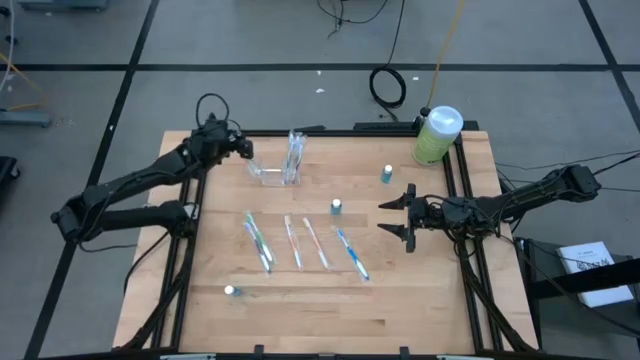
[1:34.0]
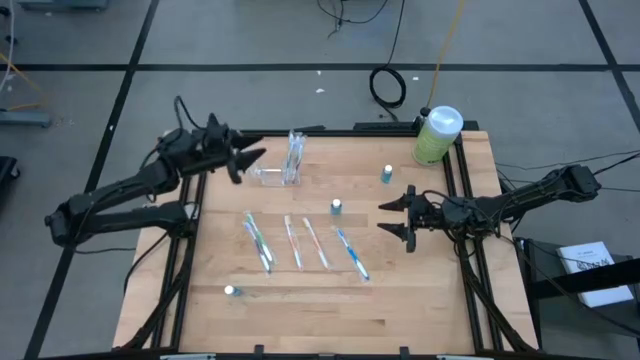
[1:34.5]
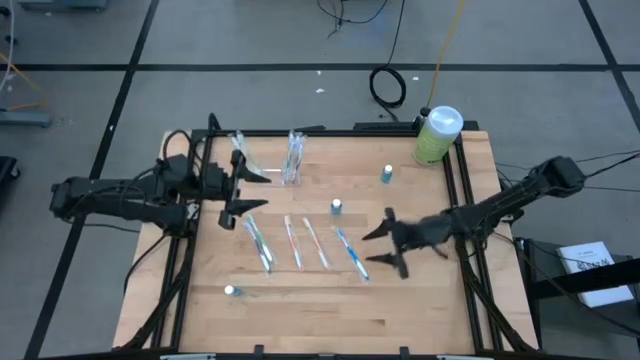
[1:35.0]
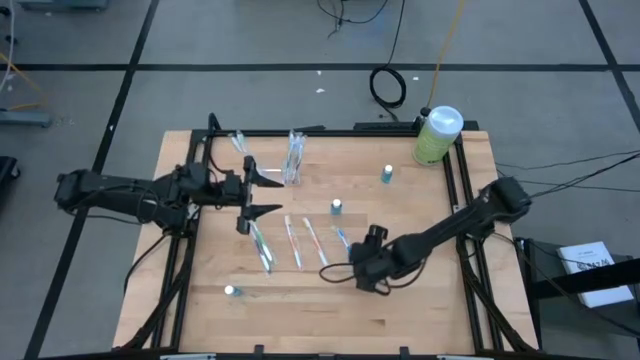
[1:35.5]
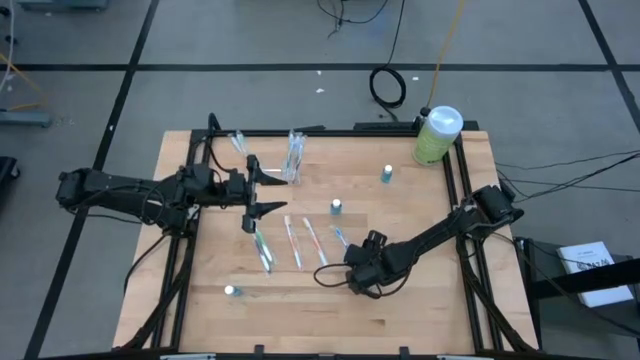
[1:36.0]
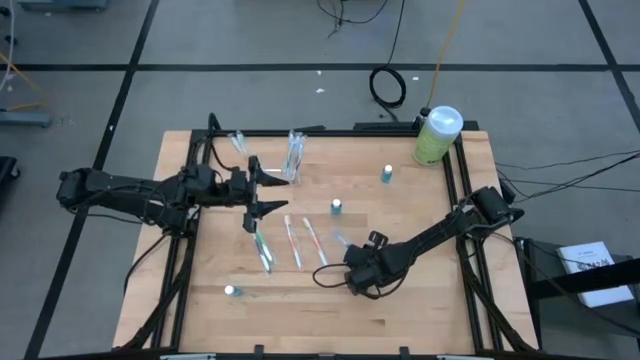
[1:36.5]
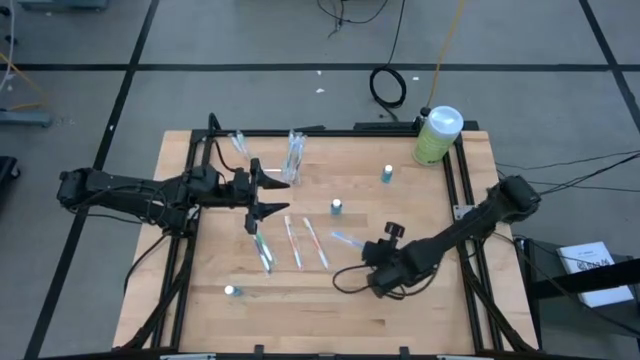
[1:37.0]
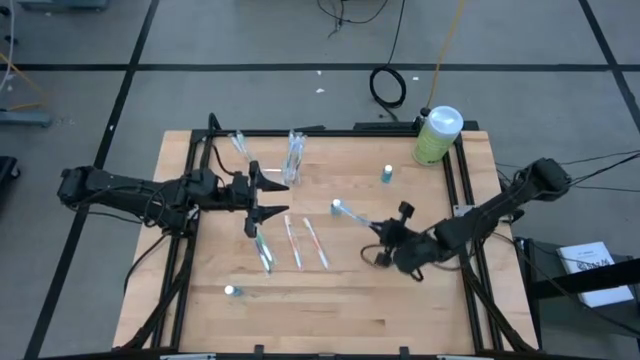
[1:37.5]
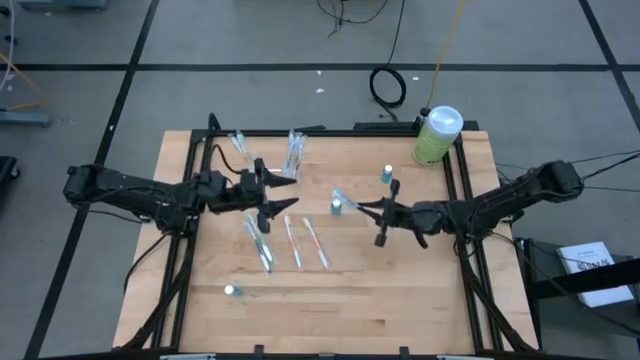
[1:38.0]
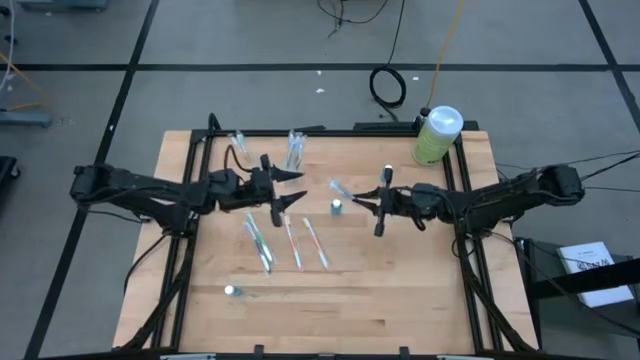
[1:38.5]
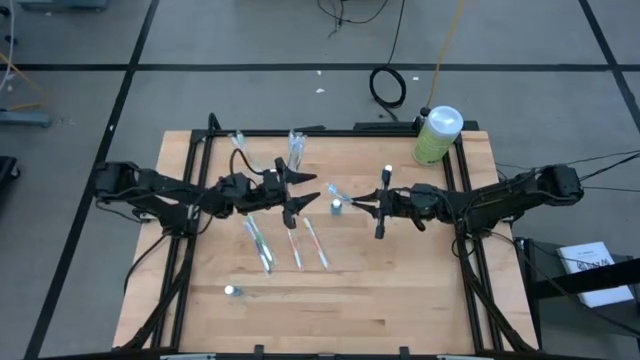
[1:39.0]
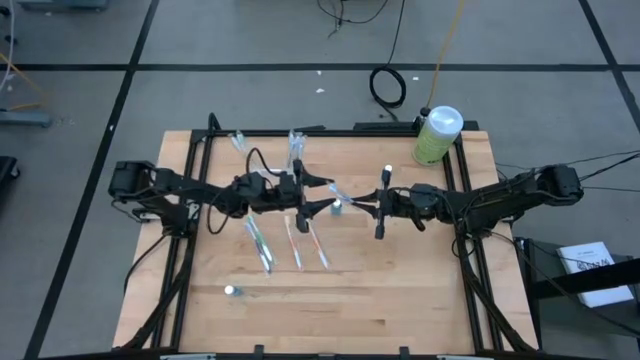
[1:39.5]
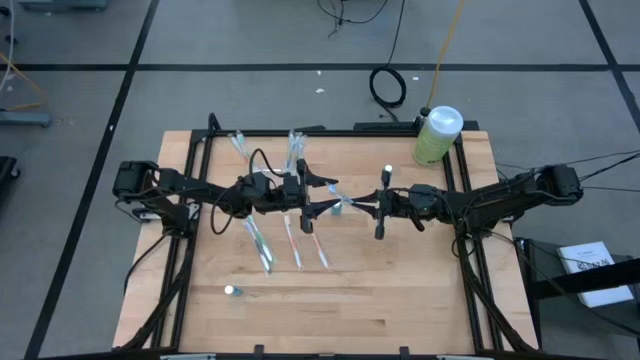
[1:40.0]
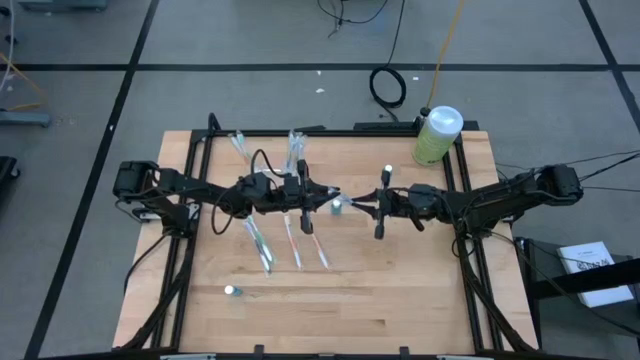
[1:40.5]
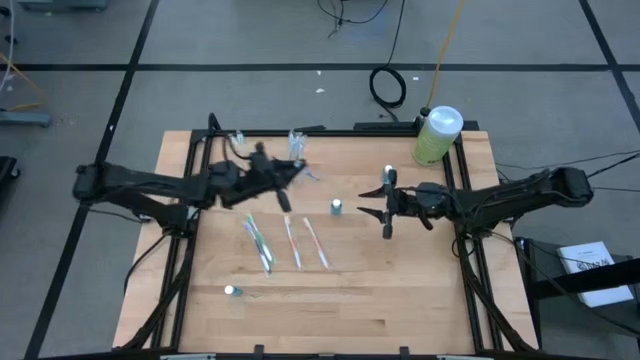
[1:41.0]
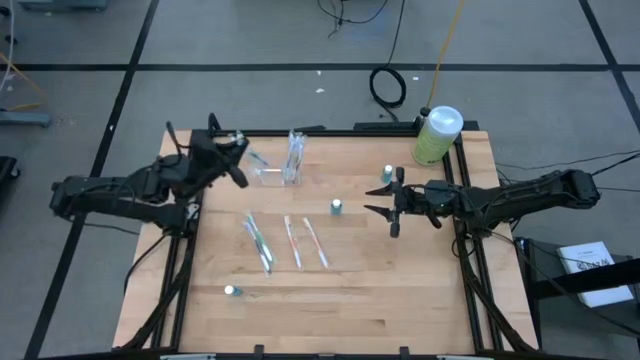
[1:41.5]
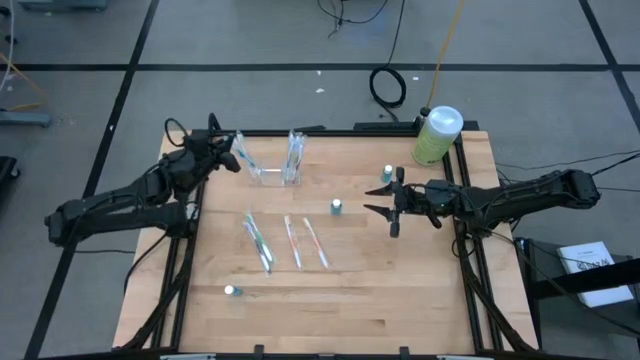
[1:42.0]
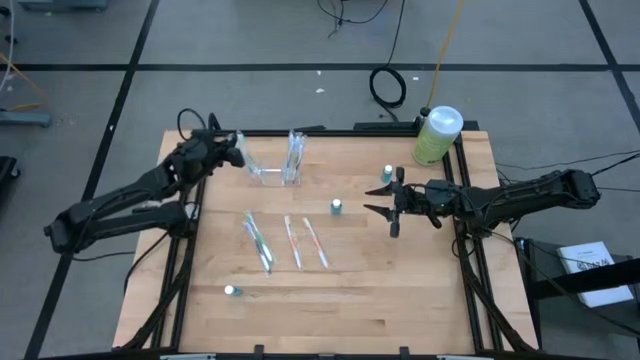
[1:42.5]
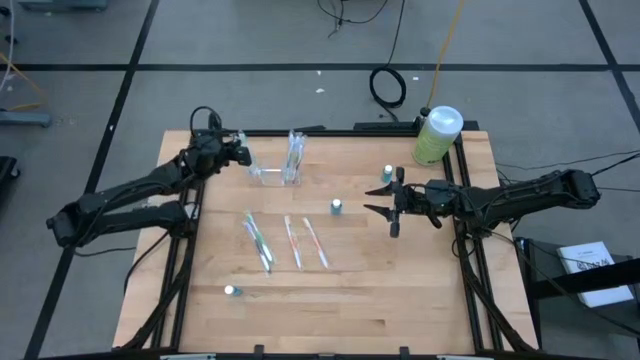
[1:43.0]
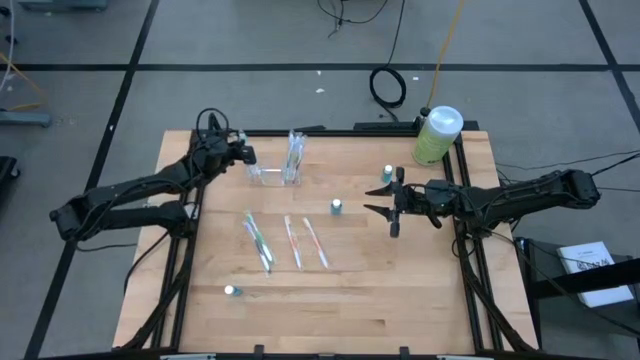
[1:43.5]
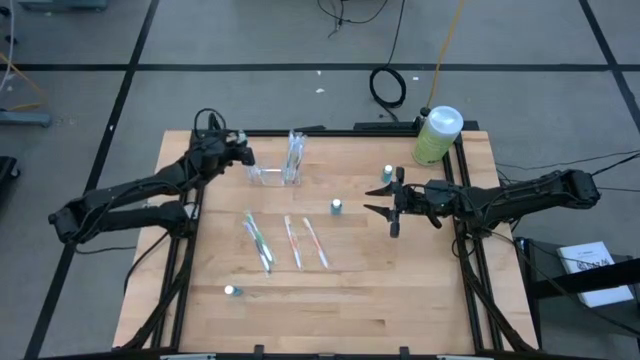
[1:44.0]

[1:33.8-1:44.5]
Task: Pick & Place toothbrushing station
Put the blue toothbrush into the transparent organizer

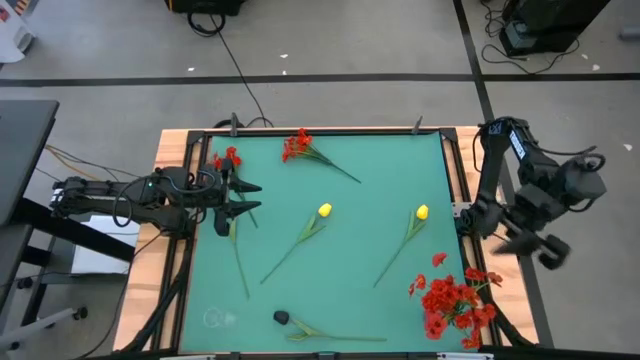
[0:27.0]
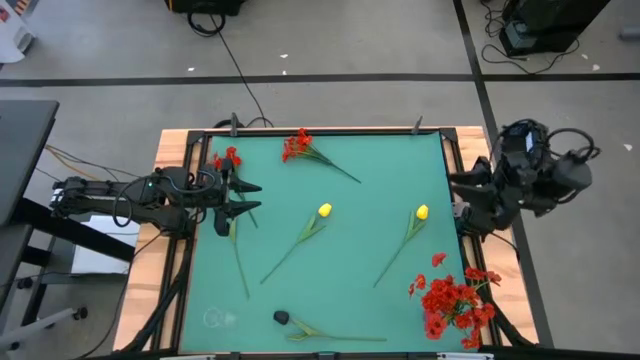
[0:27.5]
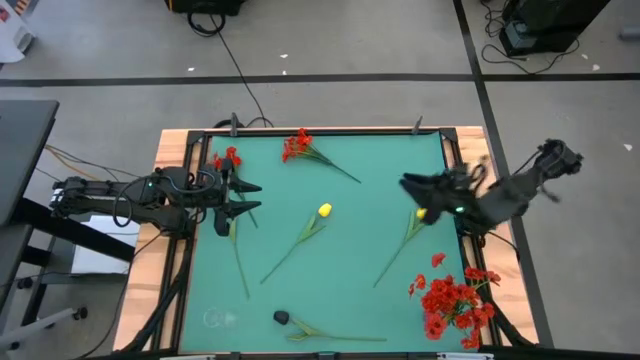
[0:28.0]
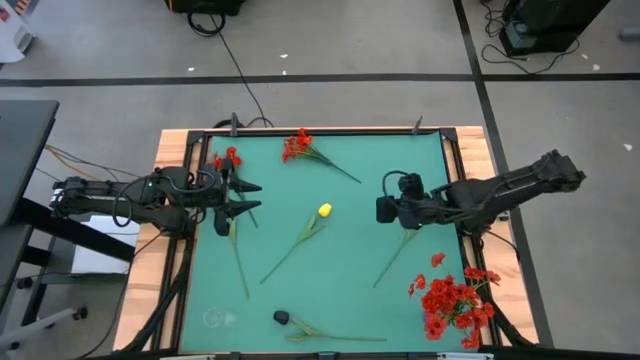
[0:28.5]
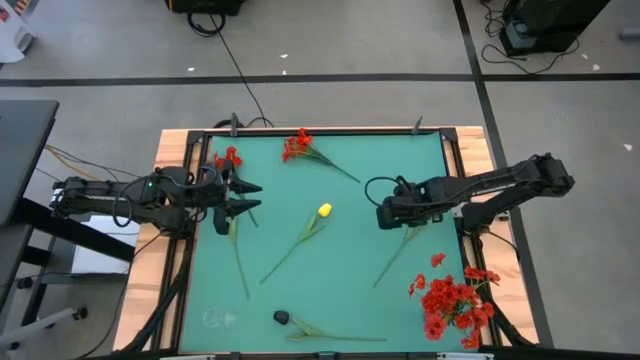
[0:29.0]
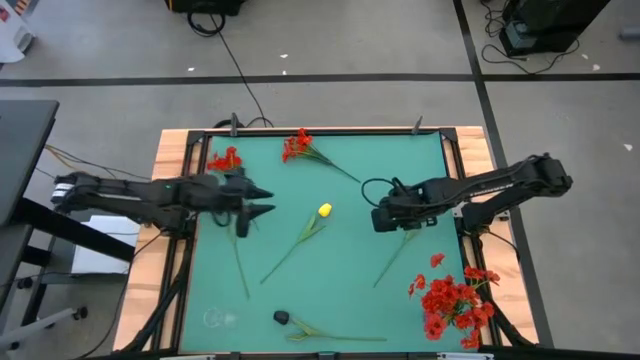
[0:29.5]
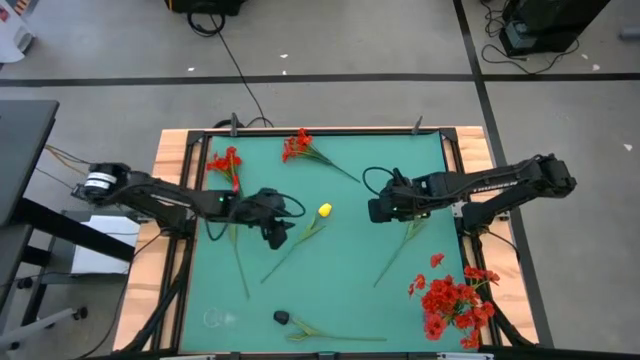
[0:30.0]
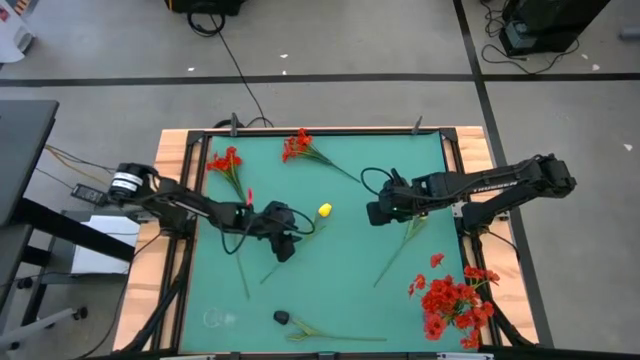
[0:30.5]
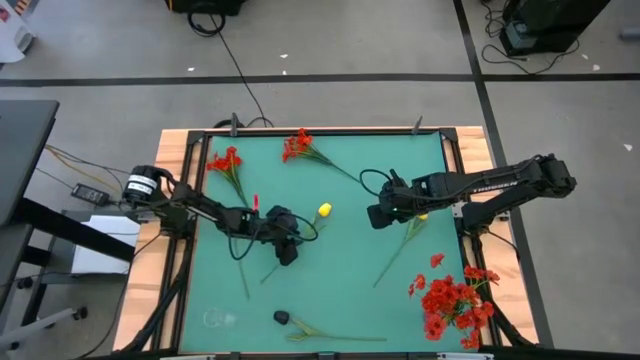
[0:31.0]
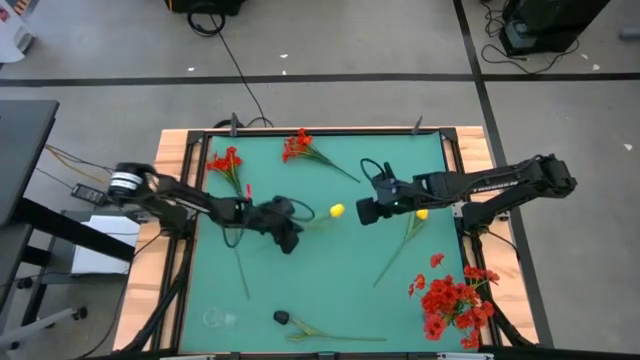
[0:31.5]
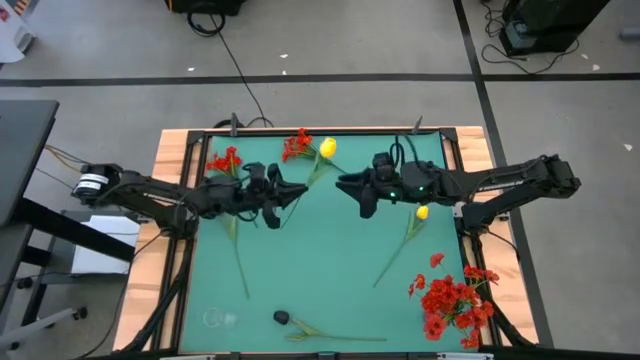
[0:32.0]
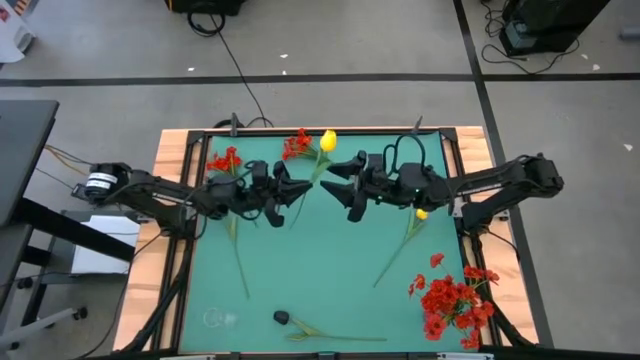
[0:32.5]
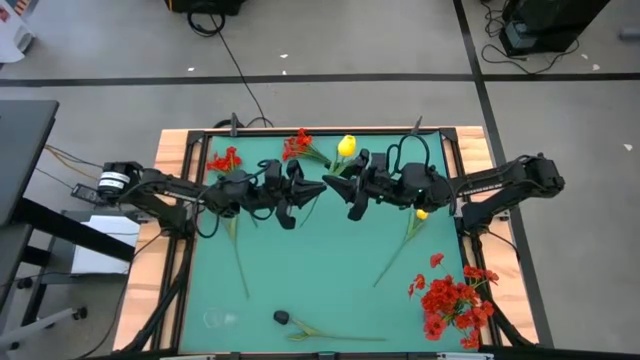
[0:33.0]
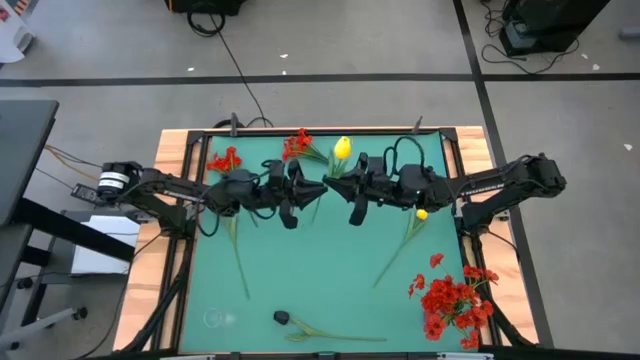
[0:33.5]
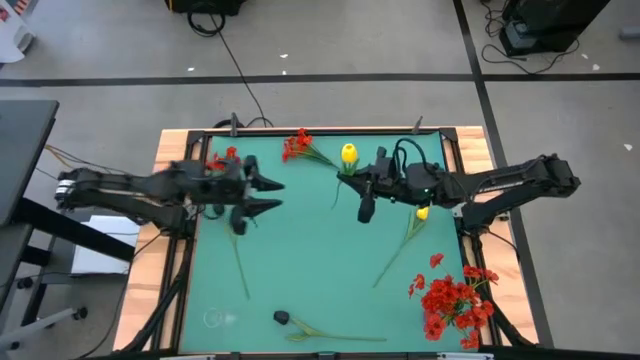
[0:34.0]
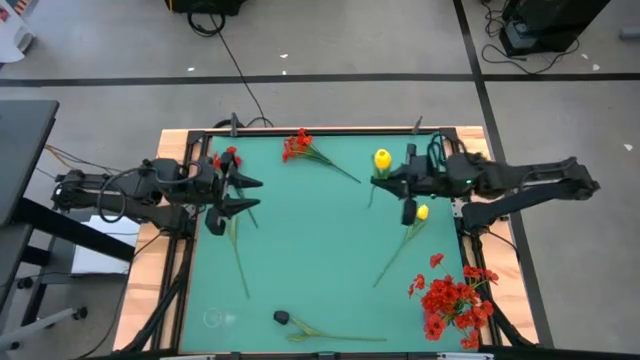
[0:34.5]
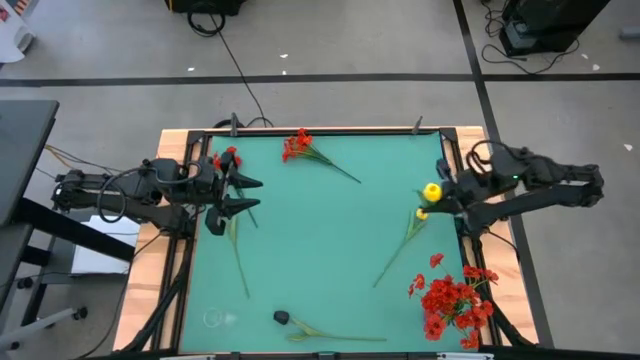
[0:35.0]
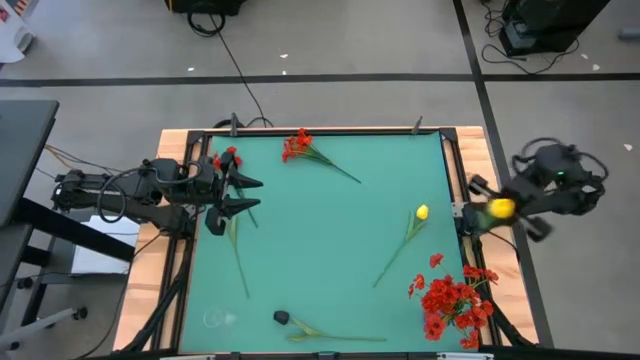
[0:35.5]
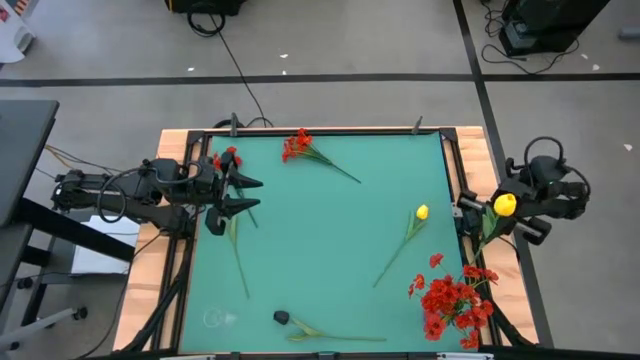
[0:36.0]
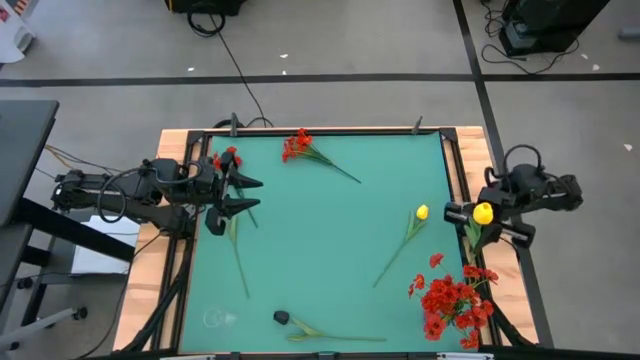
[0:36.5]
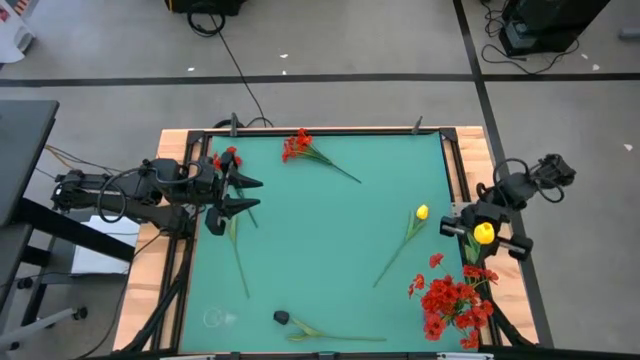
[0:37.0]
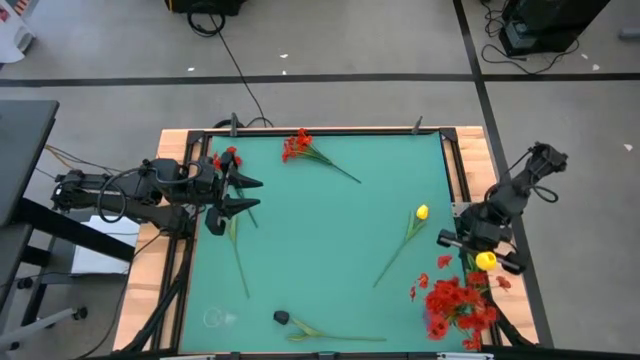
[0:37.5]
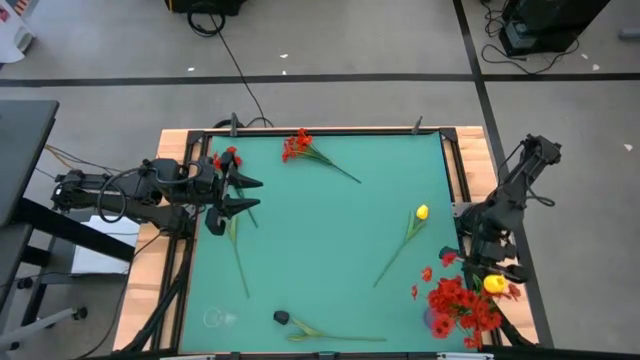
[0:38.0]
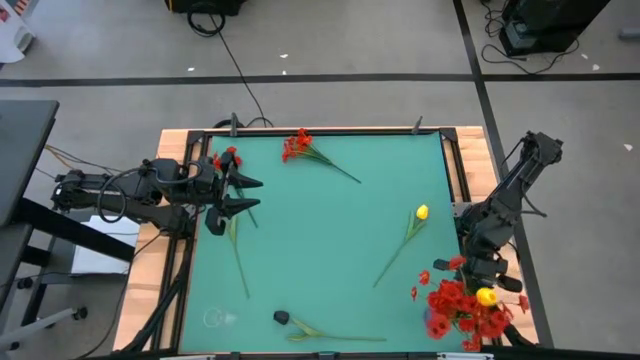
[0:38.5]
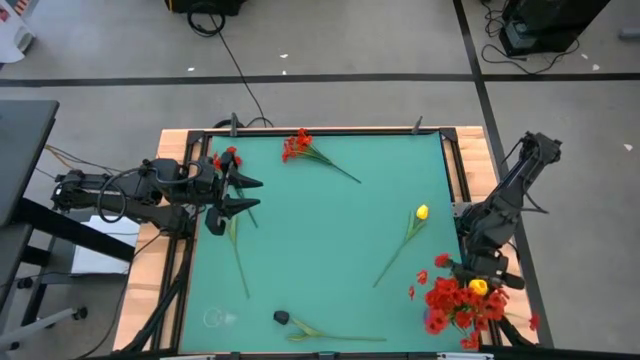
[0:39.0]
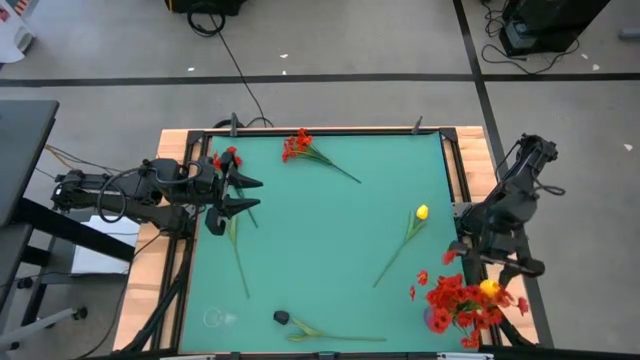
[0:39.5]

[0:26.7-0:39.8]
Task: Sort flowers into vase by color
Put the left yellow tulip into the violet vase
